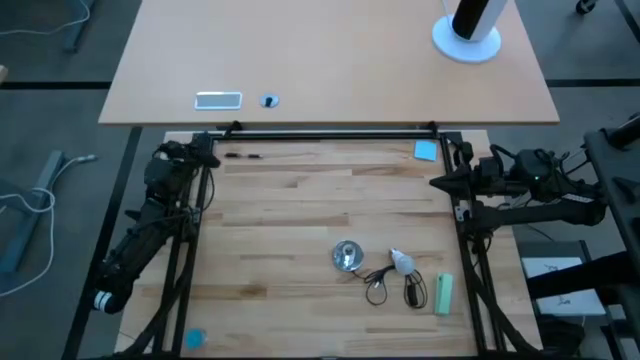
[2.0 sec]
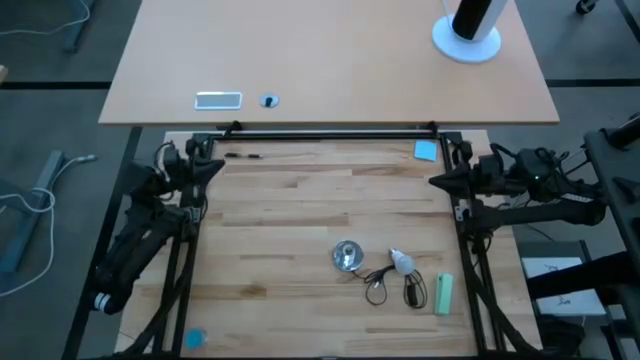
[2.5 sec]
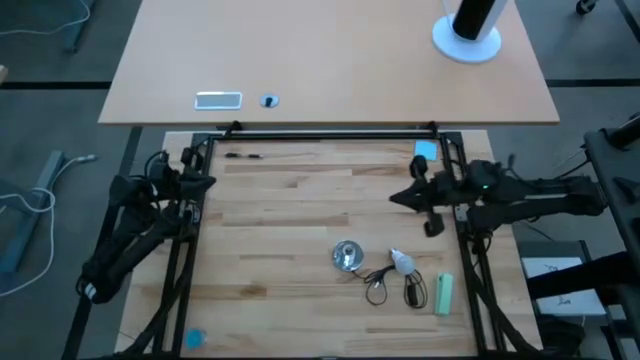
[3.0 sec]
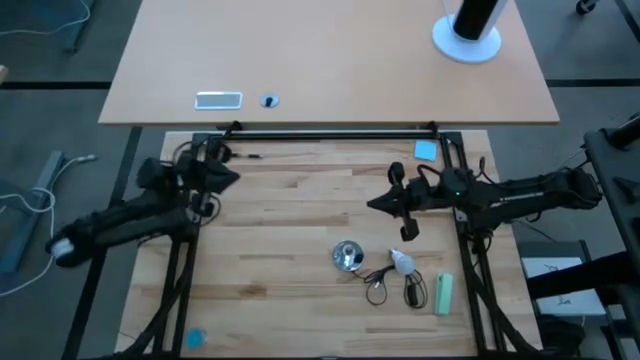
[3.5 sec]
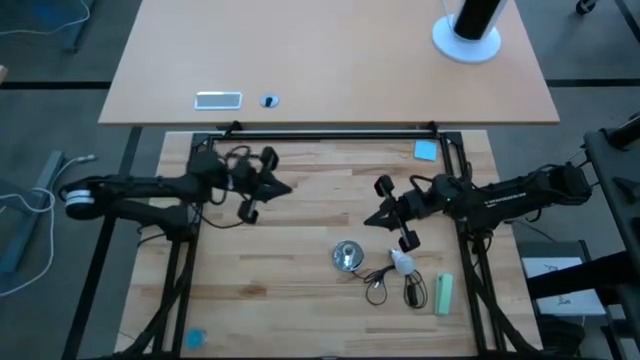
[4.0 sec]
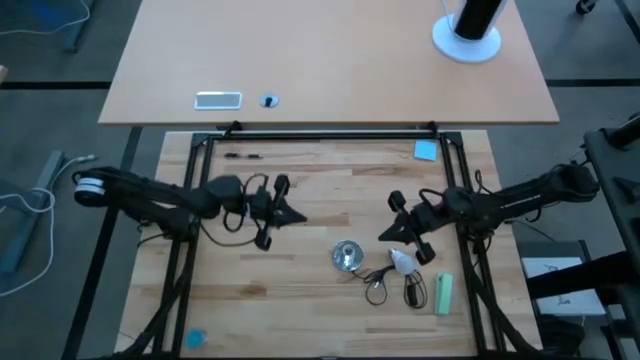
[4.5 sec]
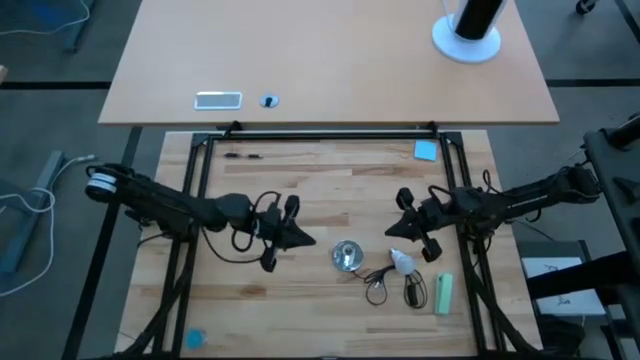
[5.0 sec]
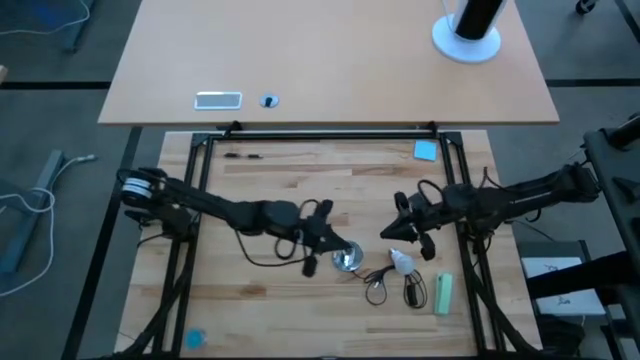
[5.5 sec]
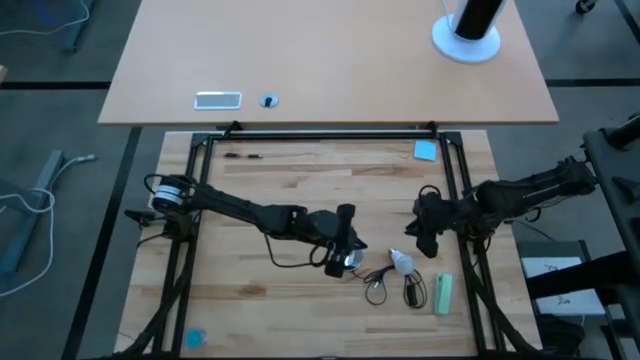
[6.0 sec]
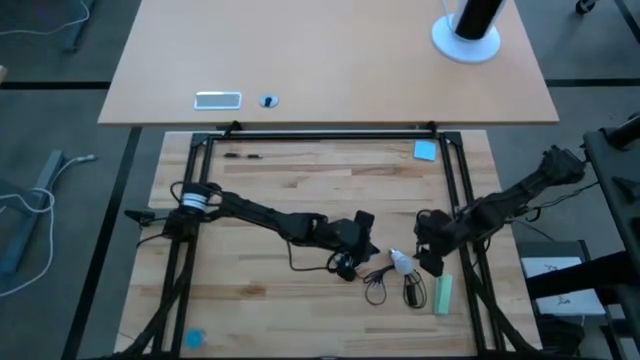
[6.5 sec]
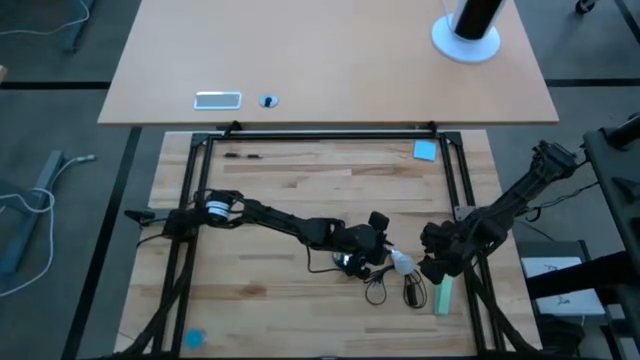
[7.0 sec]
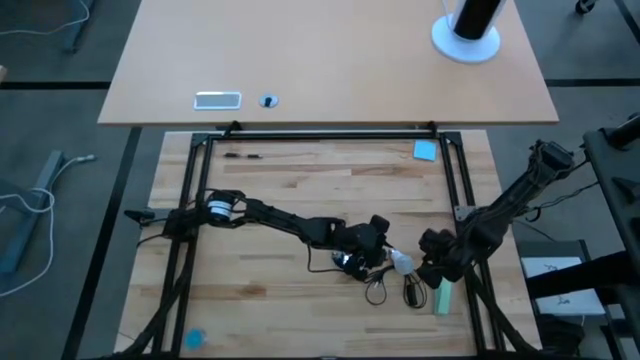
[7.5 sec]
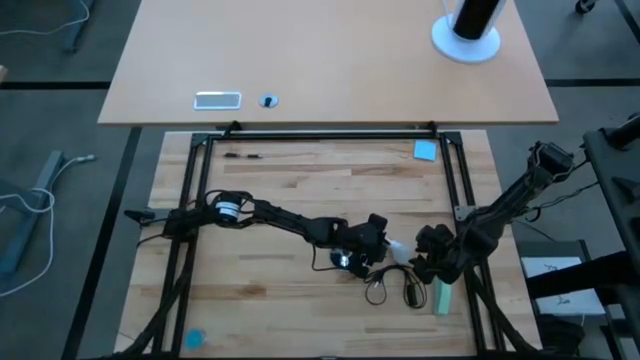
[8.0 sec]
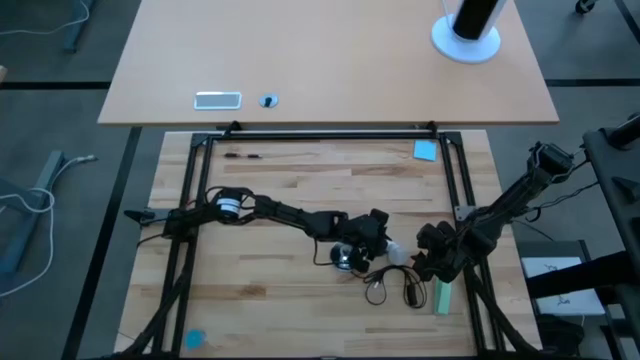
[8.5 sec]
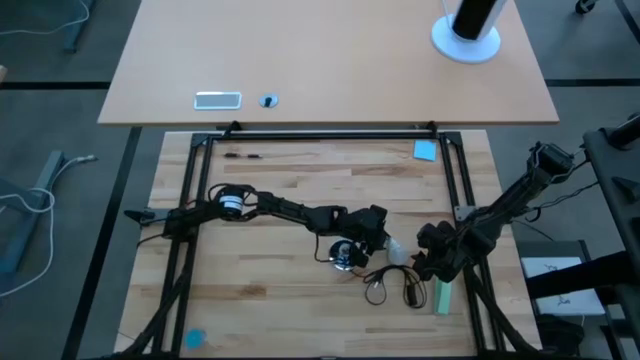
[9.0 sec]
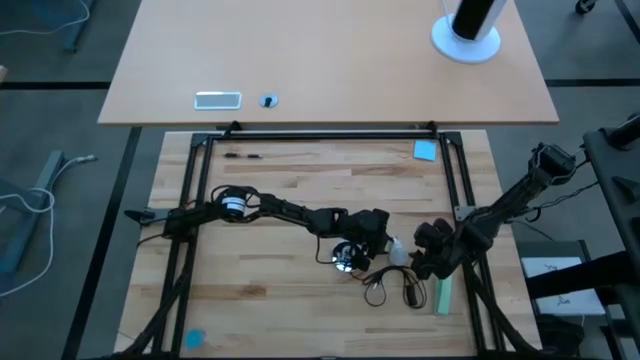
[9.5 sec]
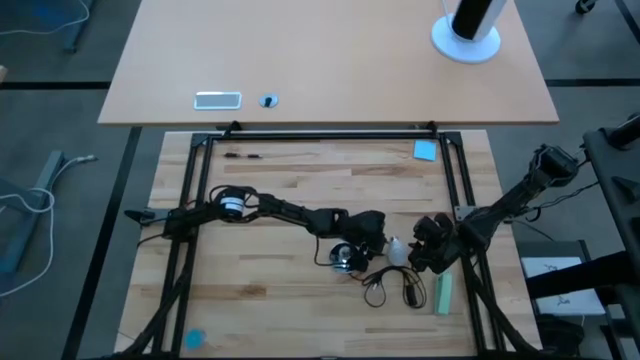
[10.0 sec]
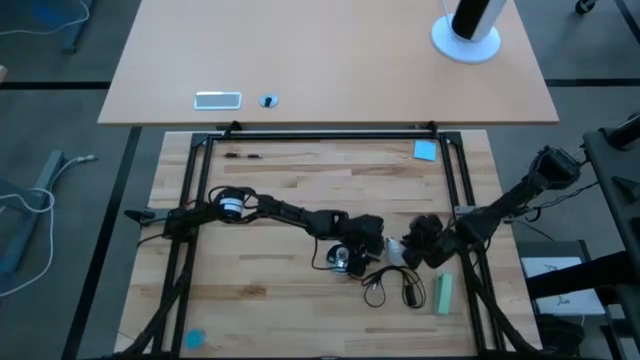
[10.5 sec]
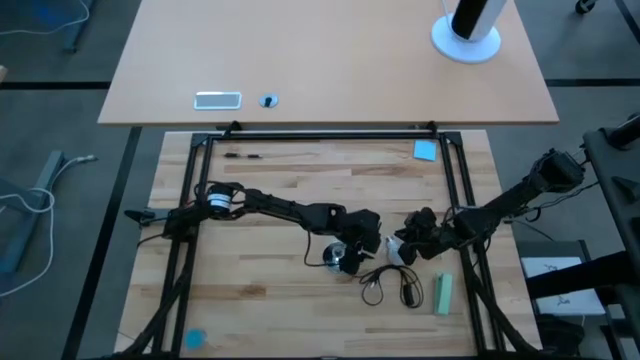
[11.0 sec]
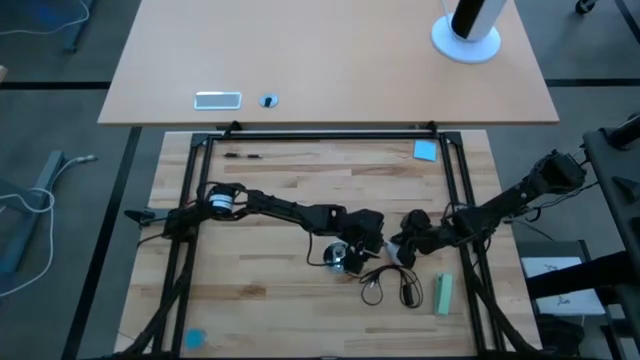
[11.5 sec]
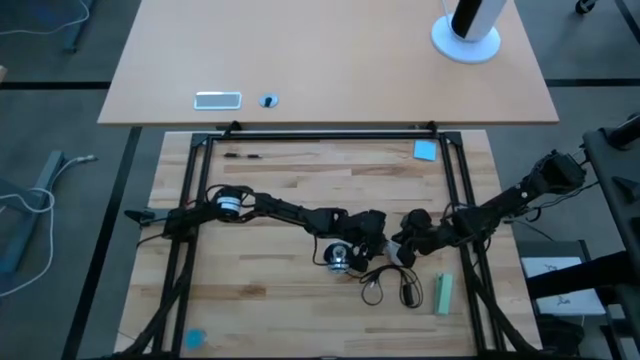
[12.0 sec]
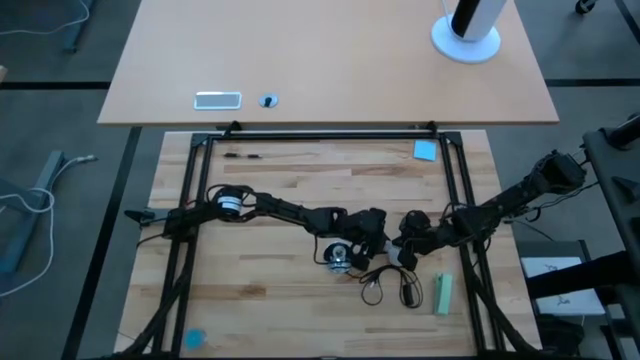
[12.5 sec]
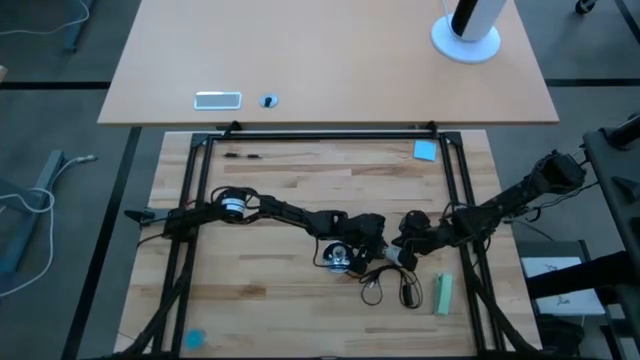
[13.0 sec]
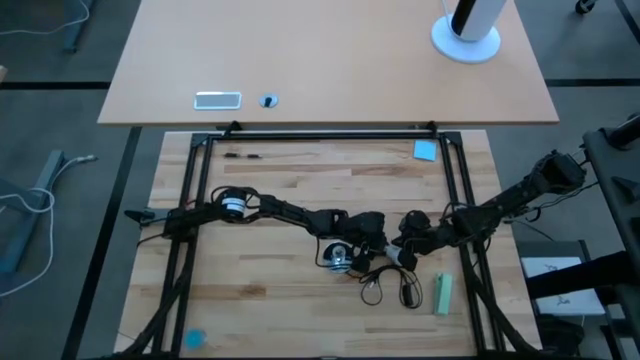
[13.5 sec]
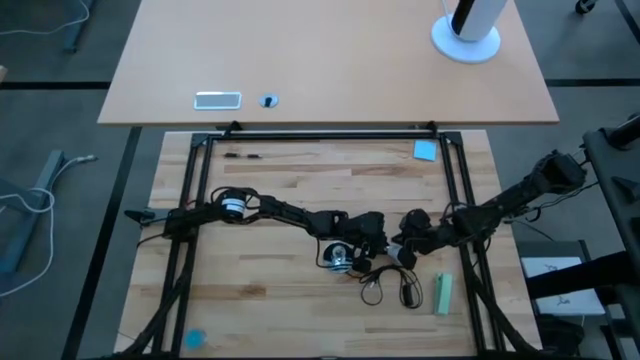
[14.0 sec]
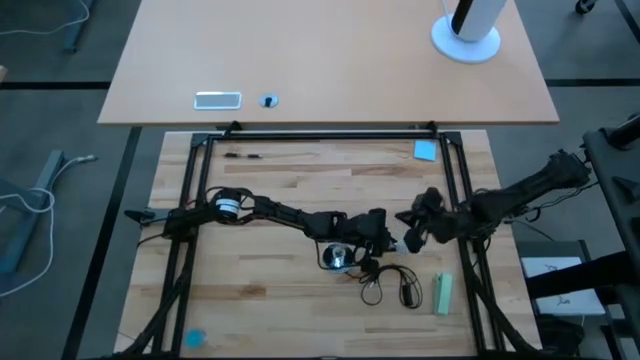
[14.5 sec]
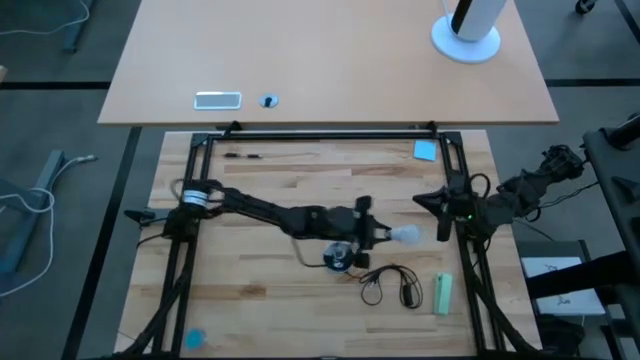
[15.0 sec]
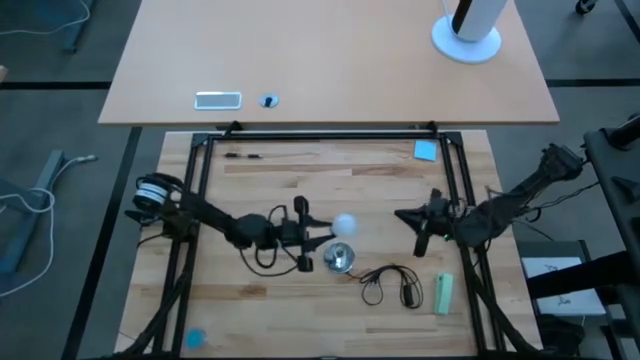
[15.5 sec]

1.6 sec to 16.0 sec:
Task: Screw lightbulb
Insert the lightbulb into the lamp

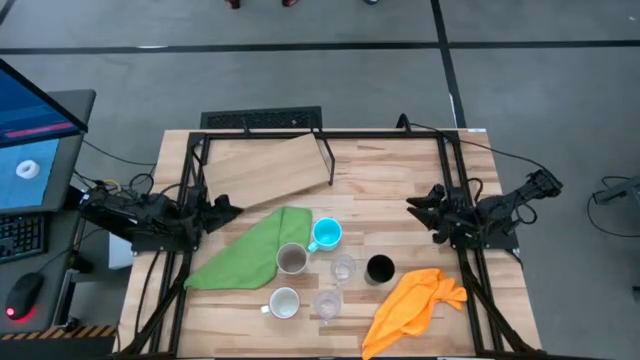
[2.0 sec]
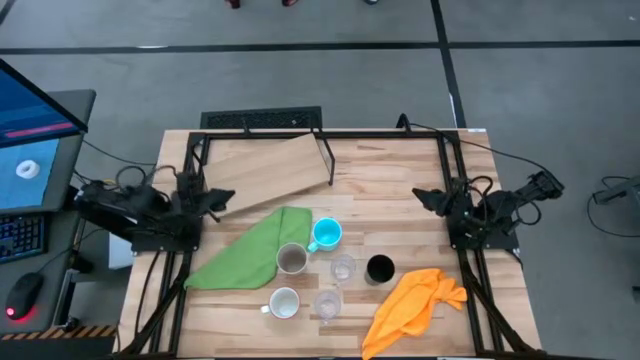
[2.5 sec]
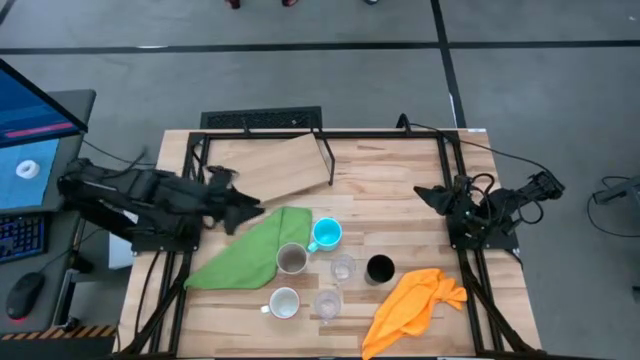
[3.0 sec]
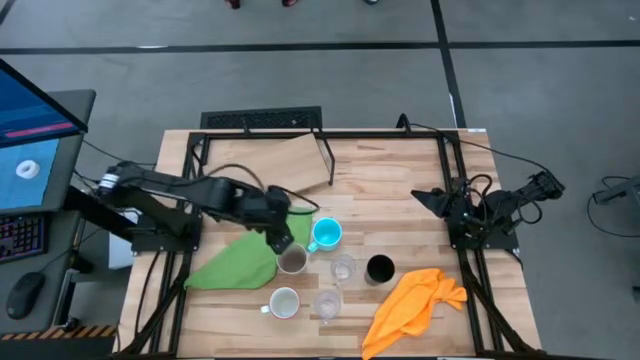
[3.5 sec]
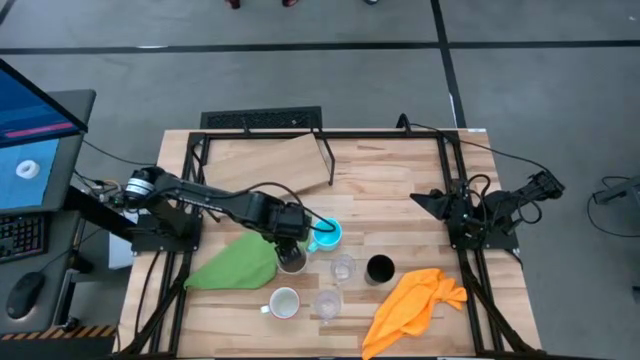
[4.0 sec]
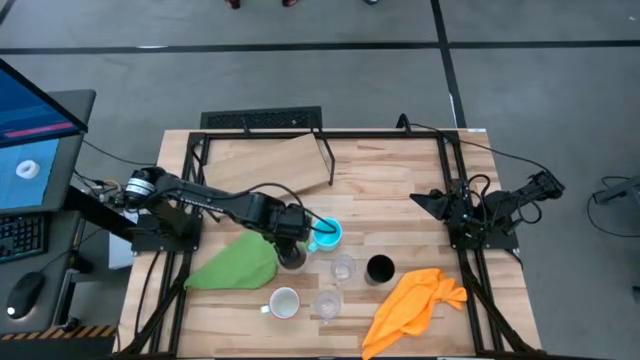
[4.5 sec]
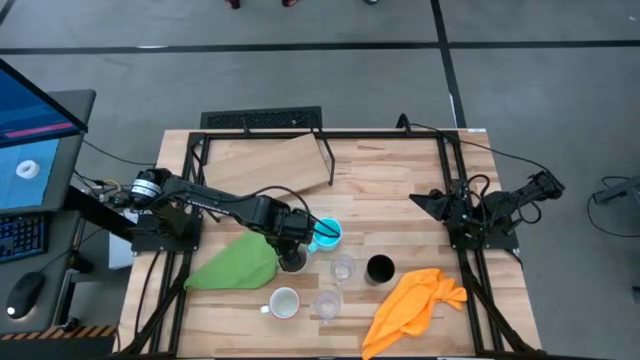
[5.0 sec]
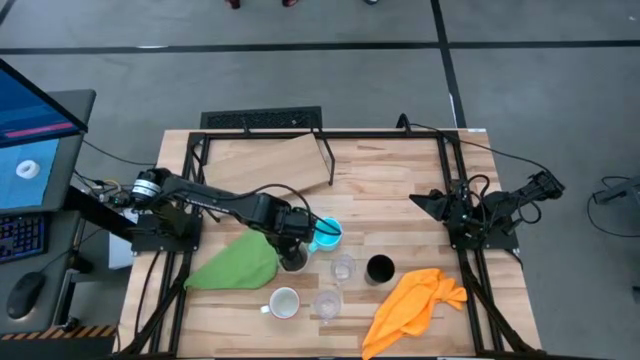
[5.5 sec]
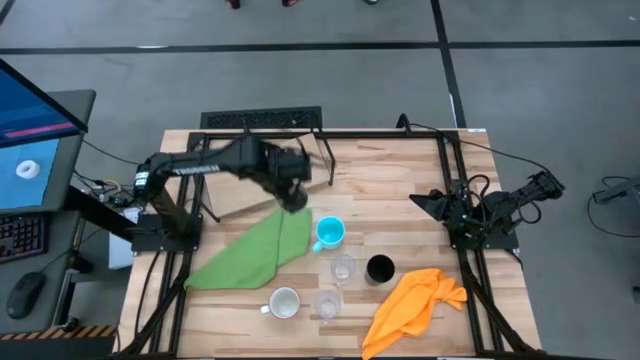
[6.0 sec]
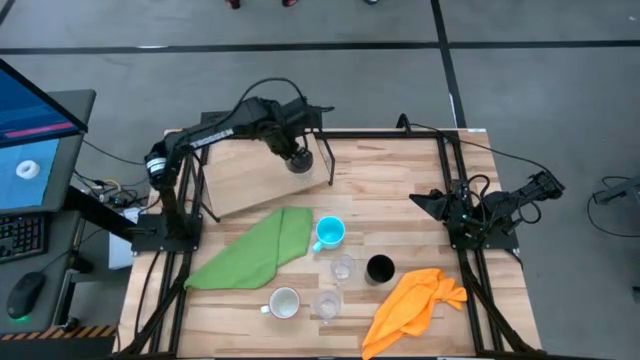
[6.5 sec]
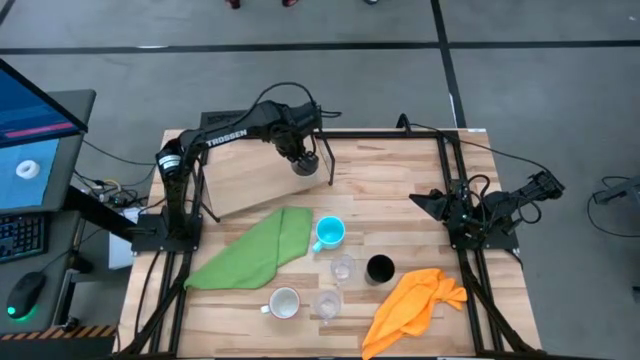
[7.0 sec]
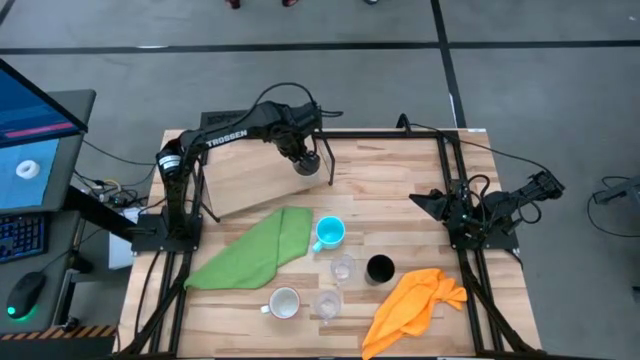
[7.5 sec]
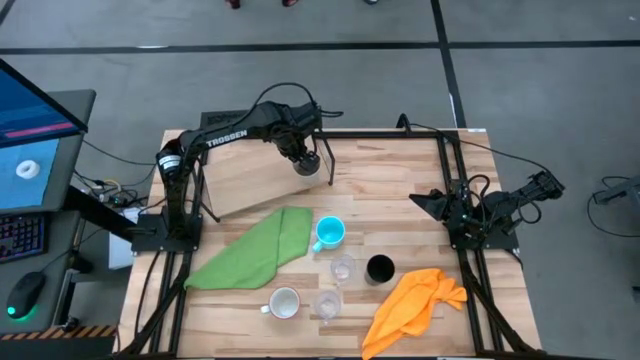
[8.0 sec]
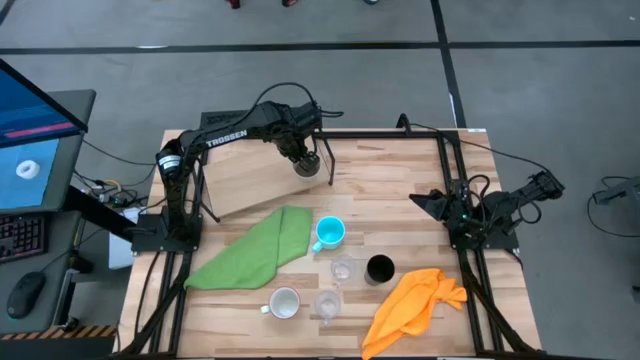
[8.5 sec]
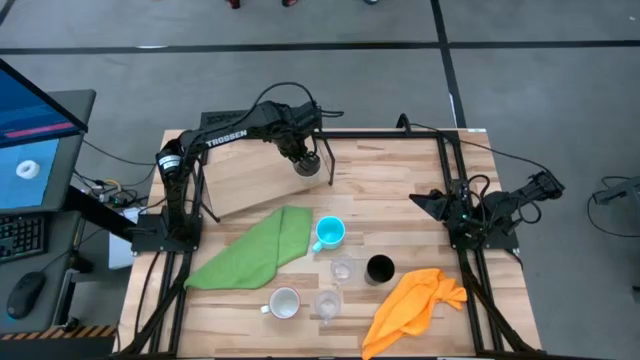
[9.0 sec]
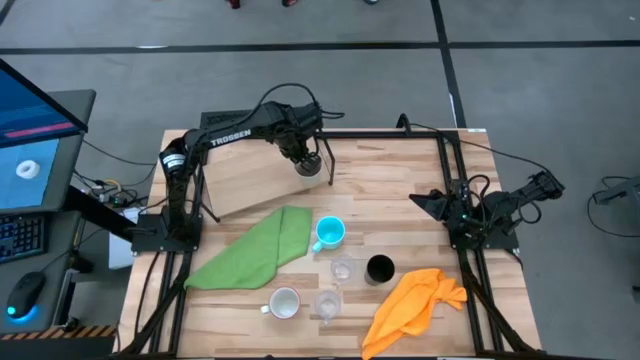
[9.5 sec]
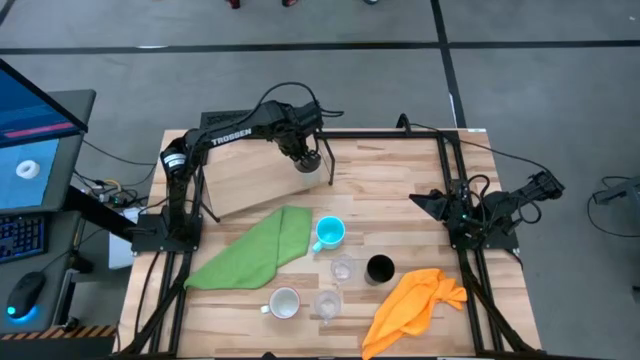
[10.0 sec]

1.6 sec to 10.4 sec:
Task: Stack small to large cups/mugs on shelf
Put the gray cup on the shelf
